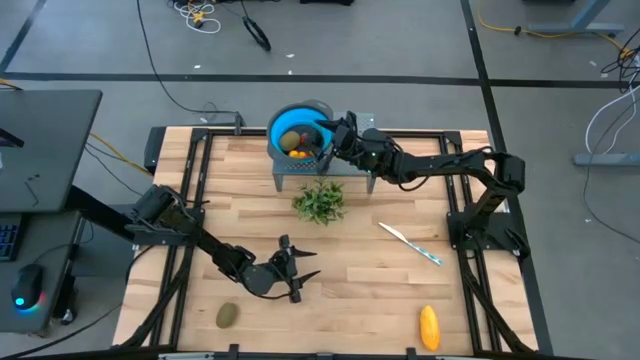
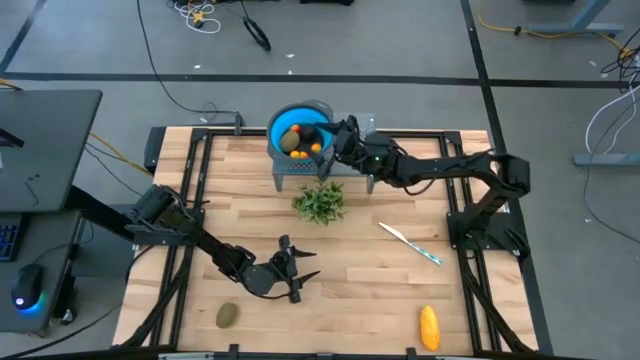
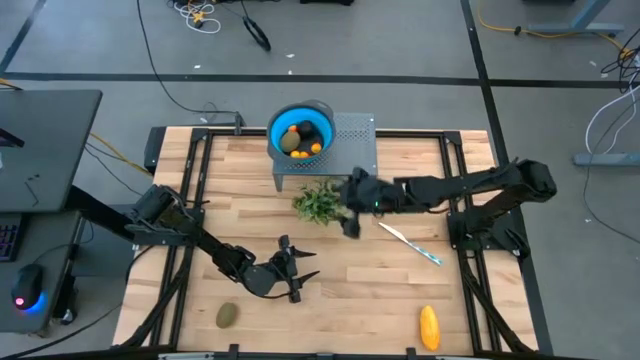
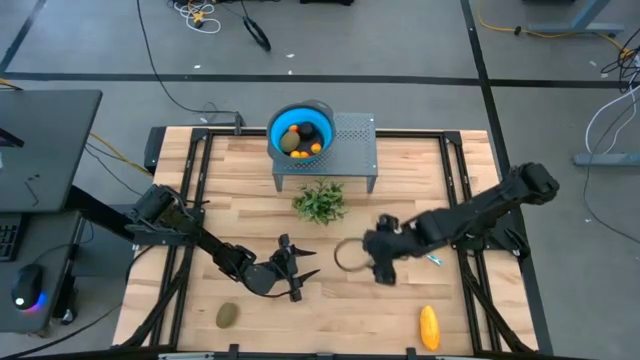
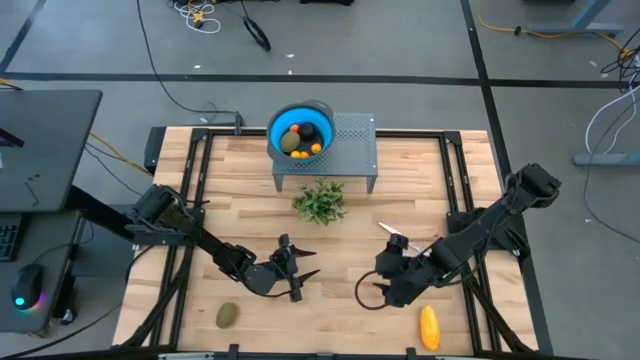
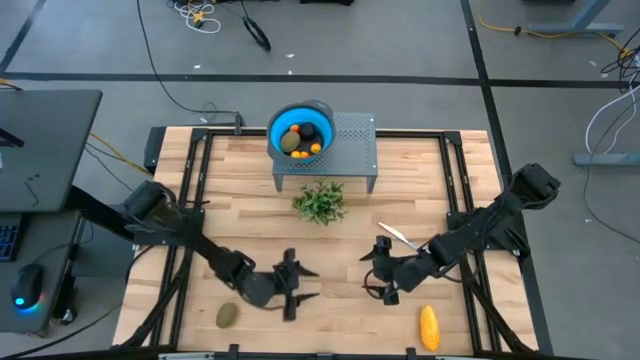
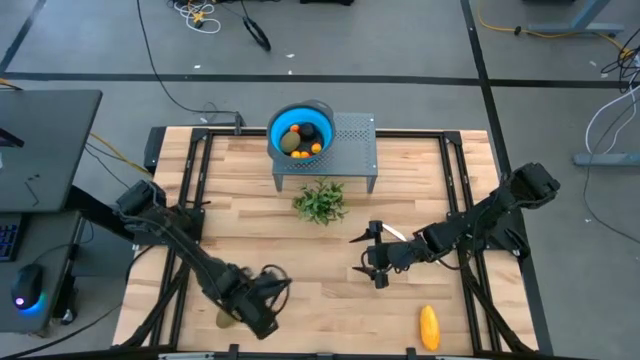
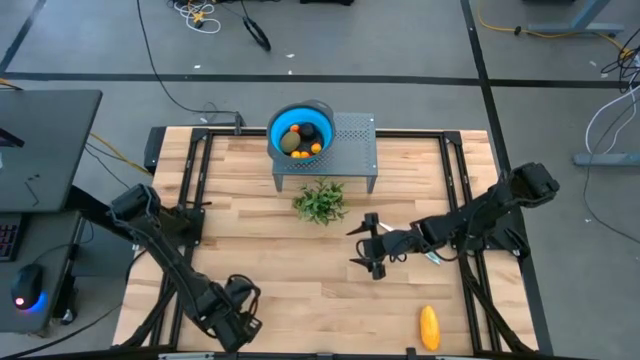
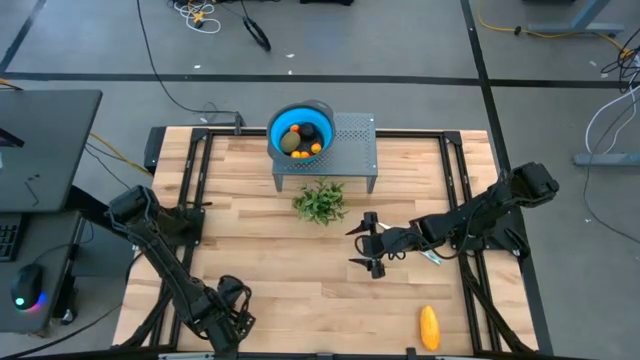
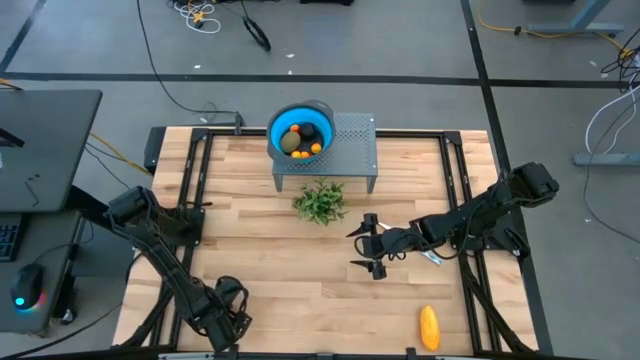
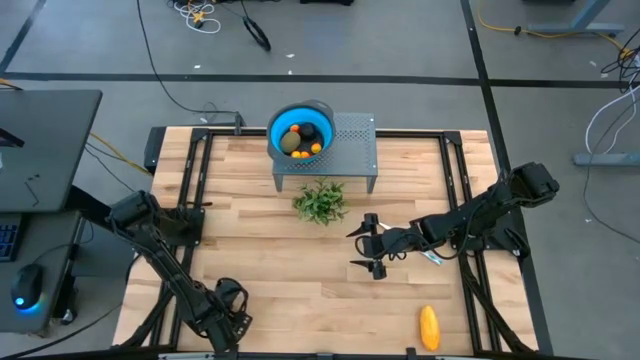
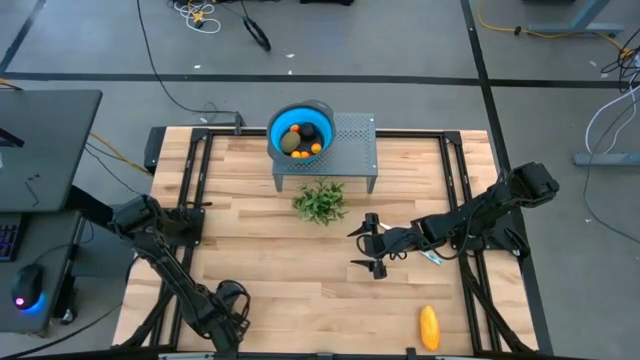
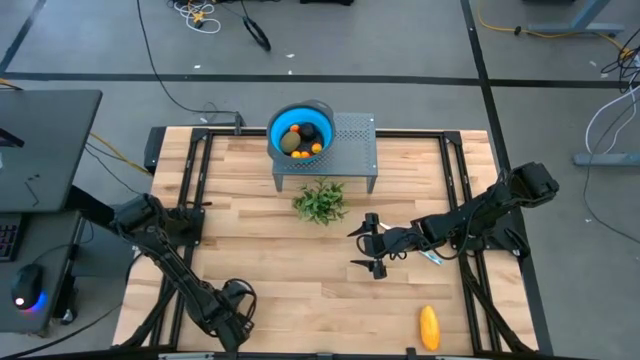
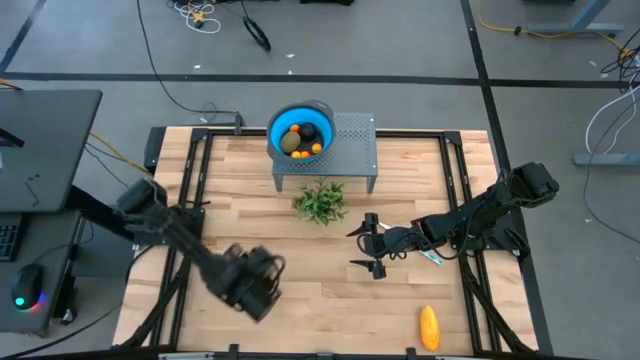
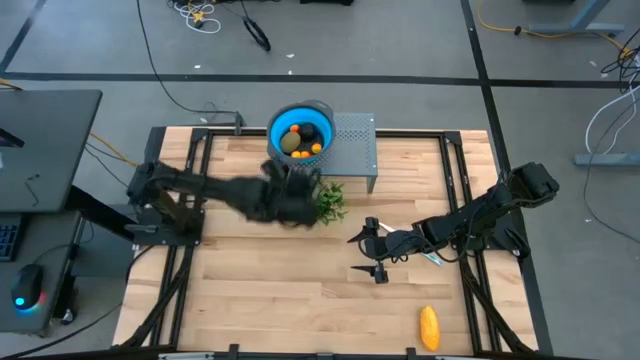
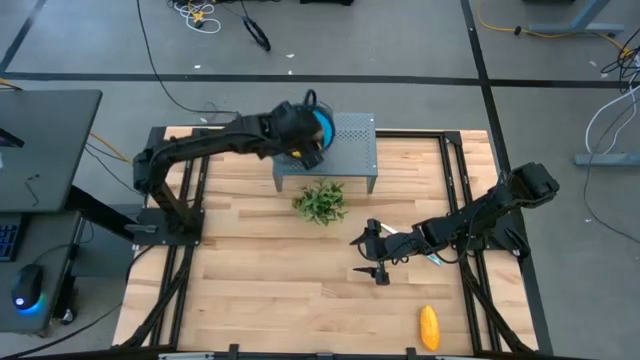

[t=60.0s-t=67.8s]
Task: Pick & Place Fruit
Put the brown kiwi into the blue strainer bowl on the shelf

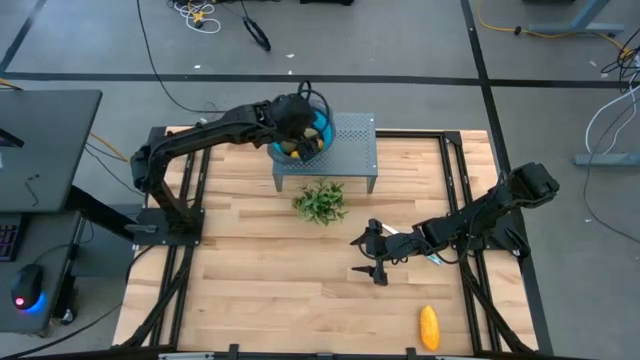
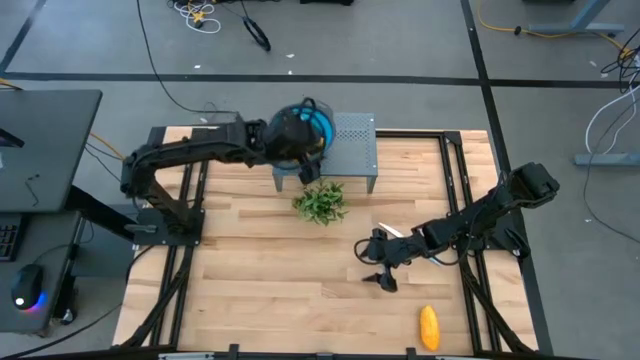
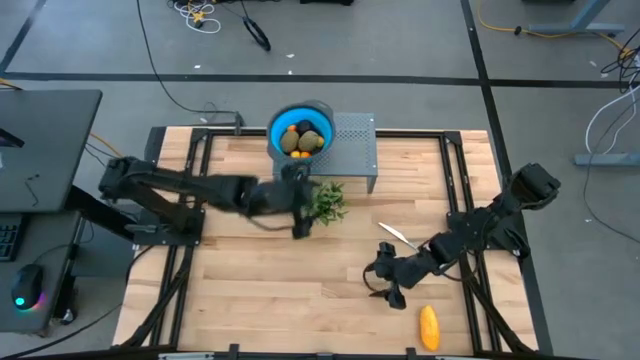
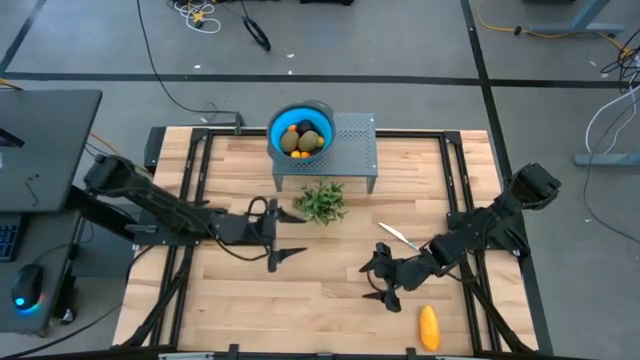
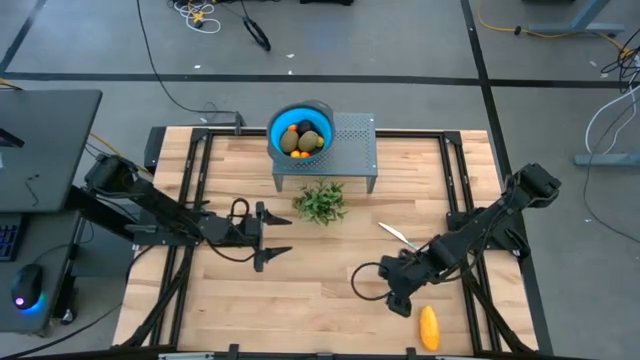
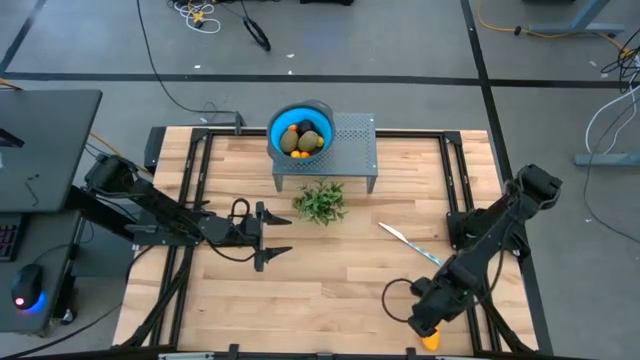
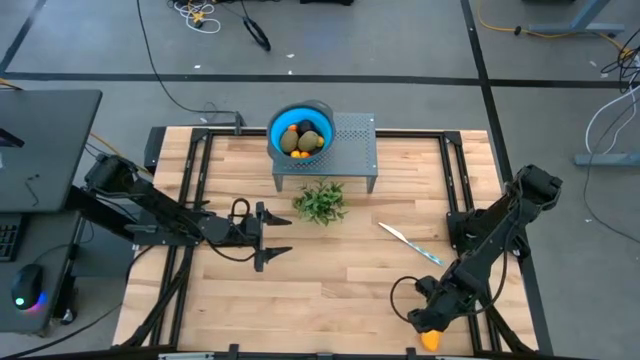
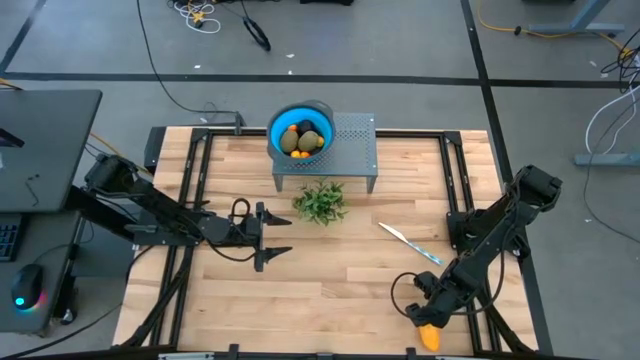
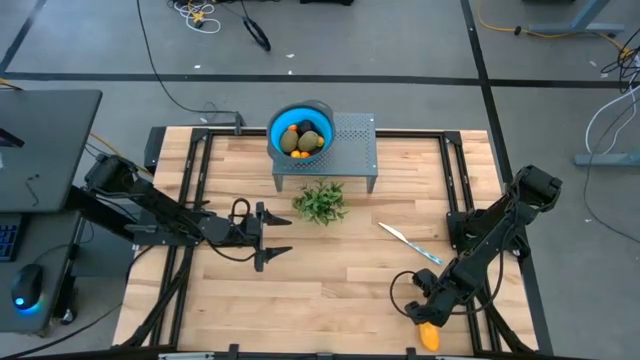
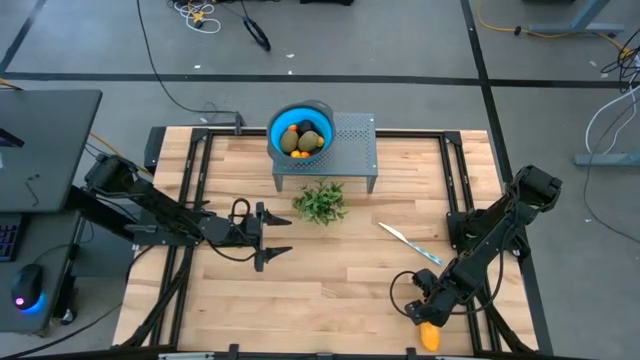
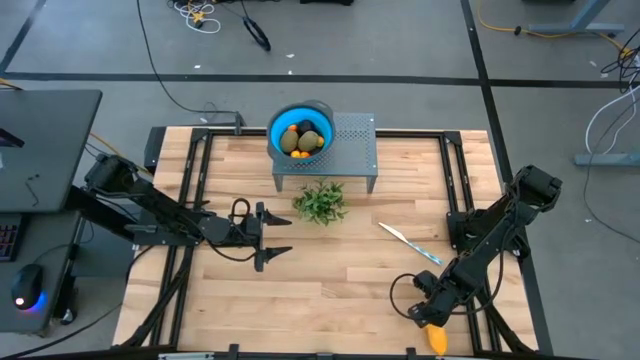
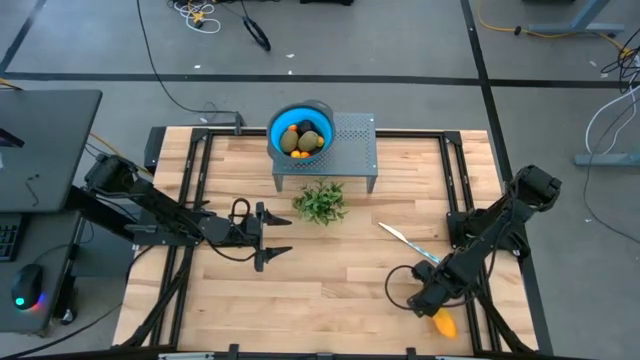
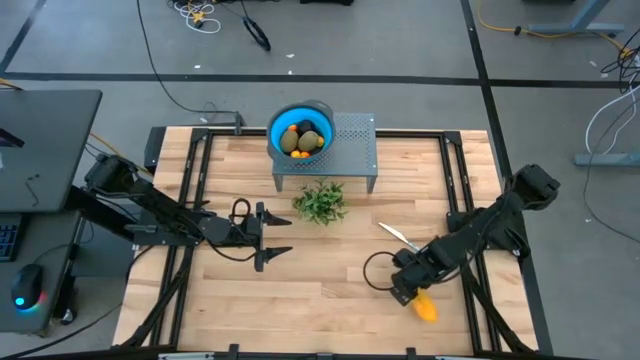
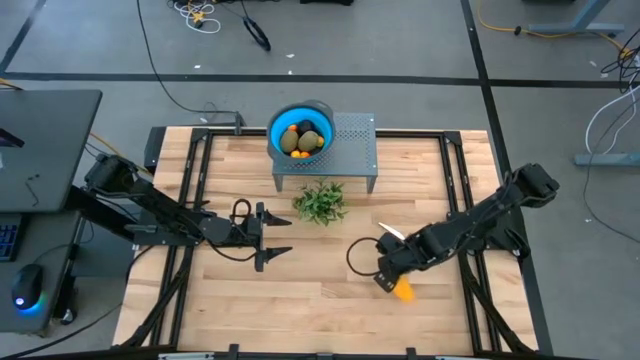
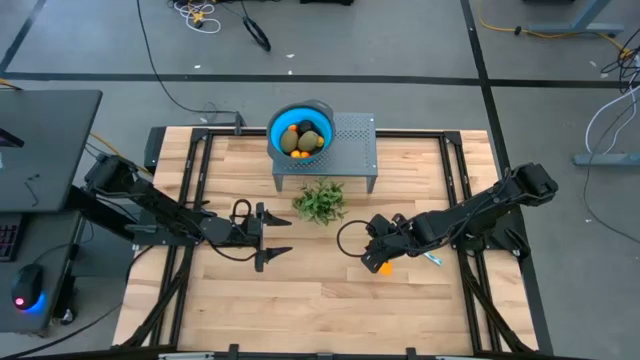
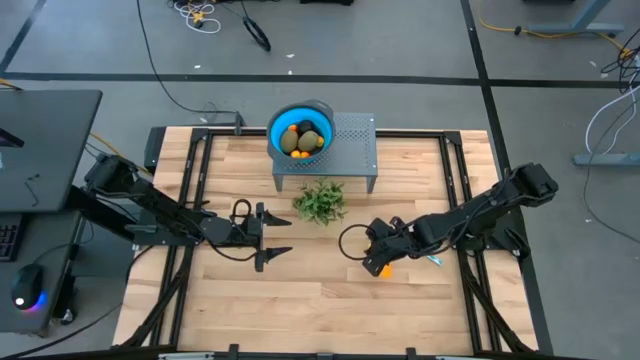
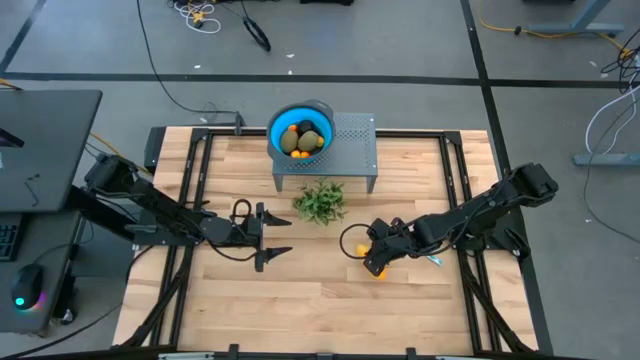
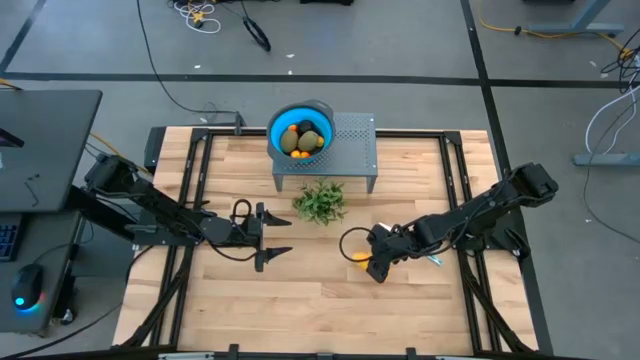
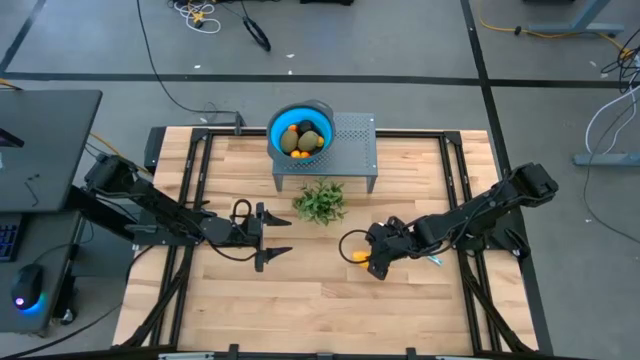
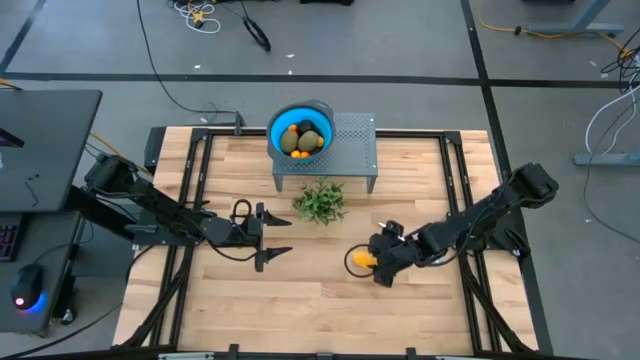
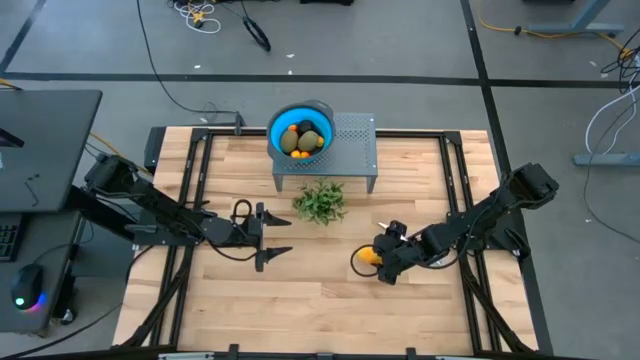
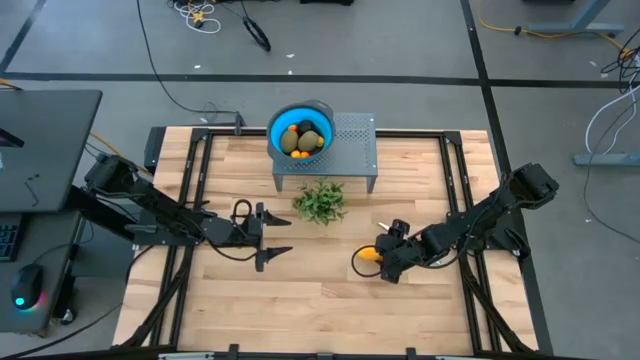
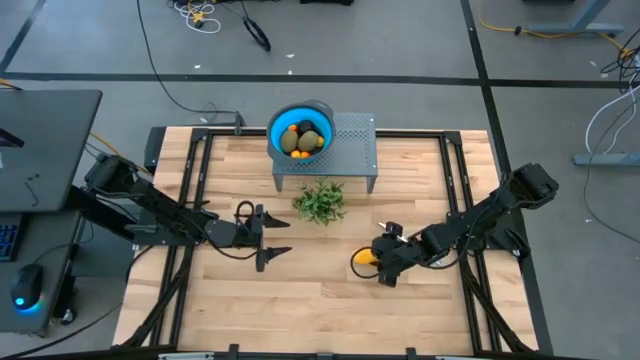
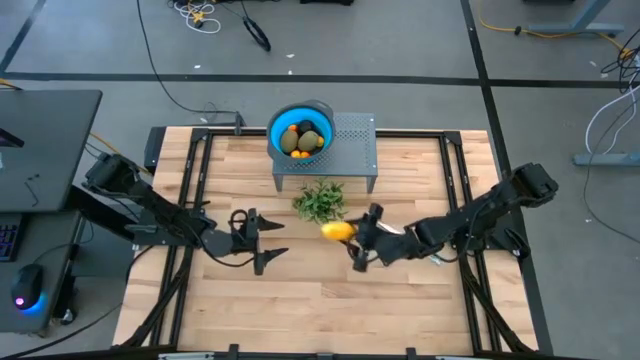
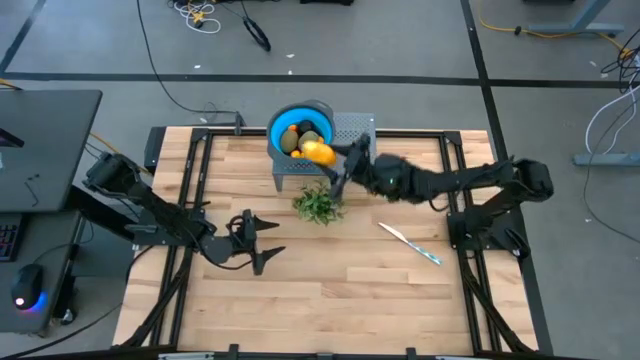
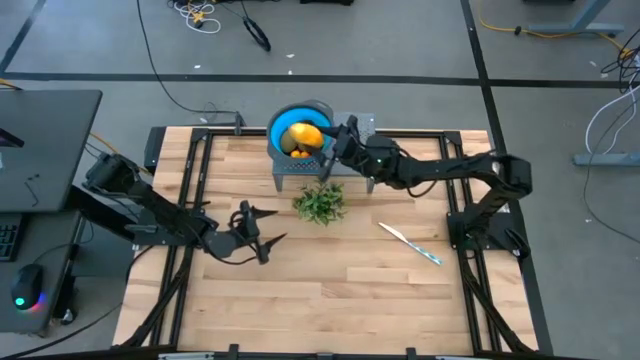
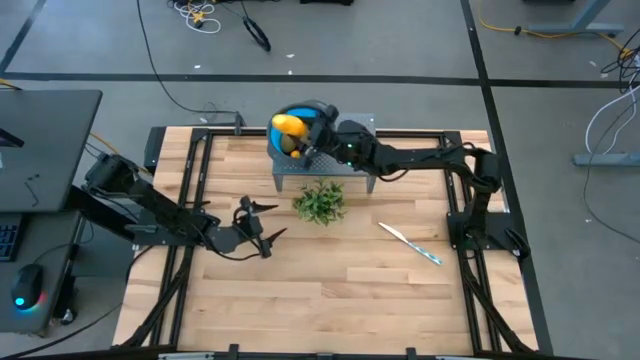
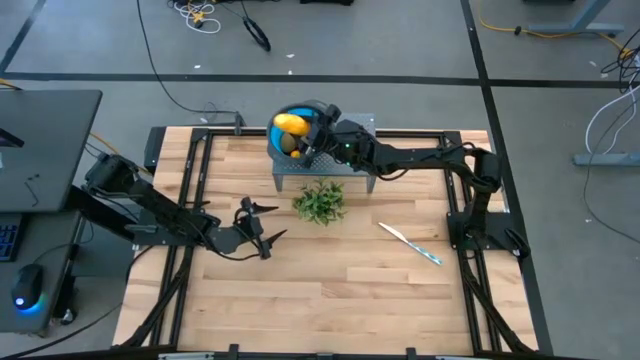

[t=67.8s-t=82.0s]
Put the yellow mango into the blue strainer bowl on the shelf
